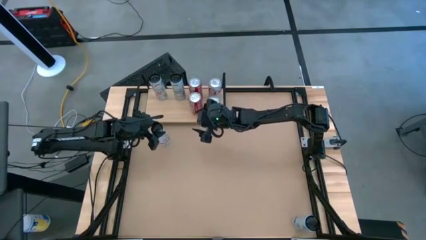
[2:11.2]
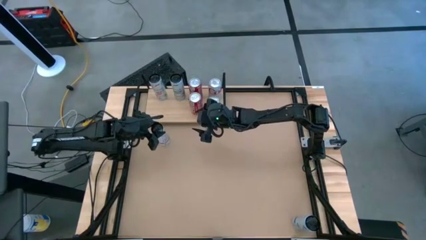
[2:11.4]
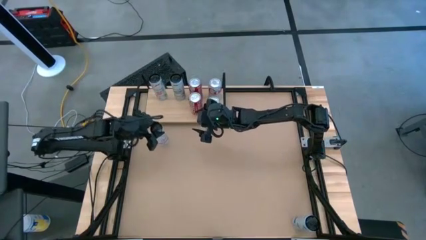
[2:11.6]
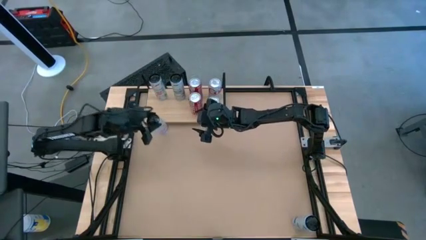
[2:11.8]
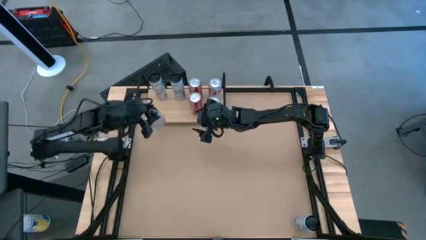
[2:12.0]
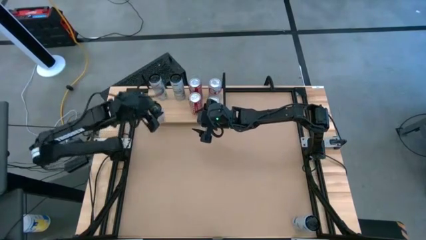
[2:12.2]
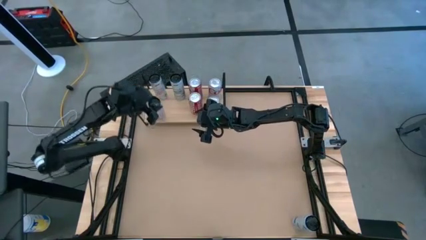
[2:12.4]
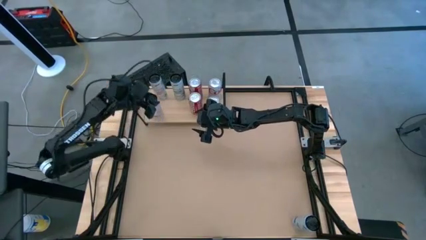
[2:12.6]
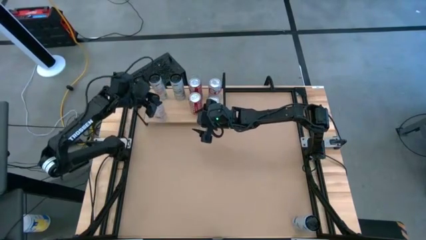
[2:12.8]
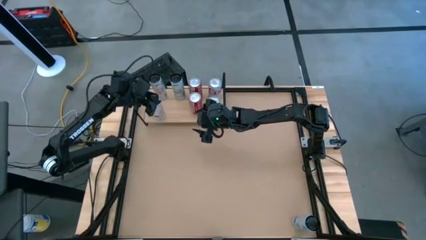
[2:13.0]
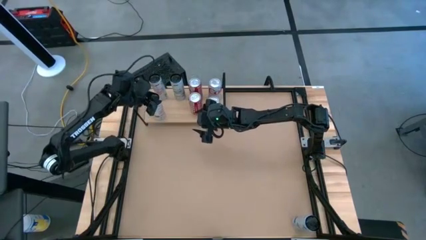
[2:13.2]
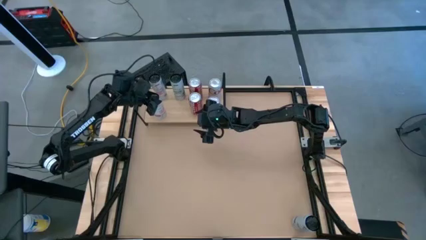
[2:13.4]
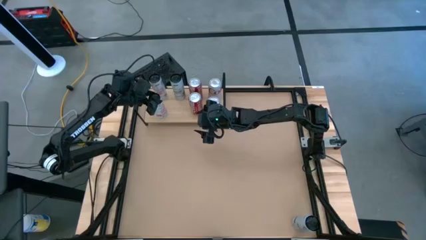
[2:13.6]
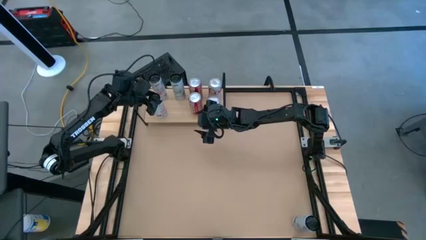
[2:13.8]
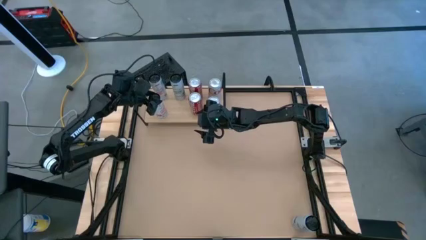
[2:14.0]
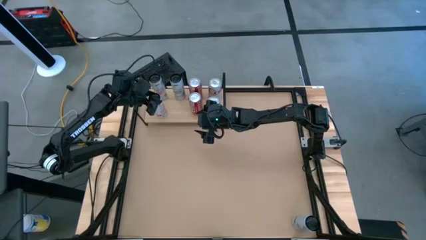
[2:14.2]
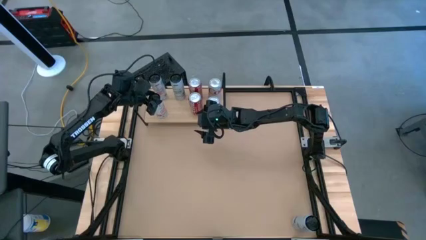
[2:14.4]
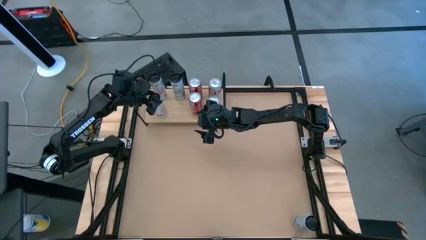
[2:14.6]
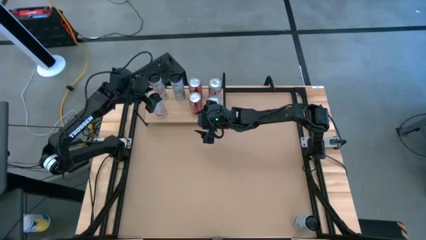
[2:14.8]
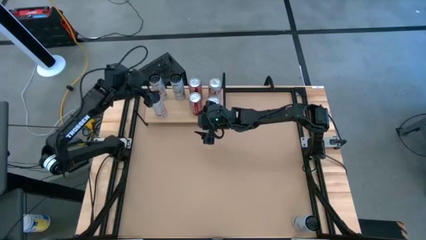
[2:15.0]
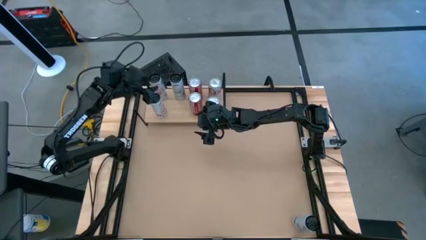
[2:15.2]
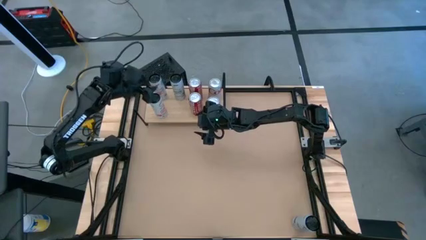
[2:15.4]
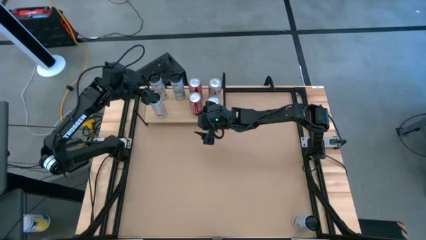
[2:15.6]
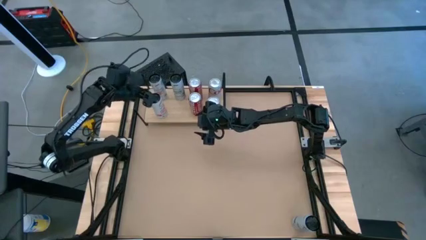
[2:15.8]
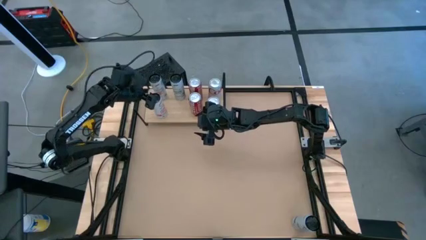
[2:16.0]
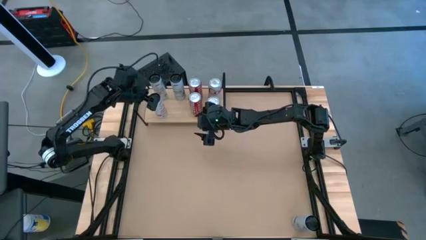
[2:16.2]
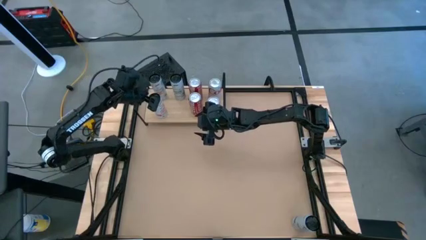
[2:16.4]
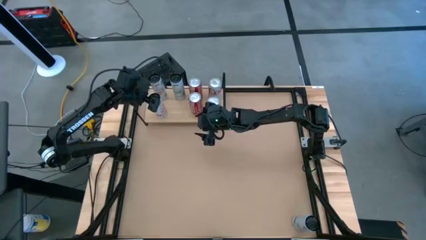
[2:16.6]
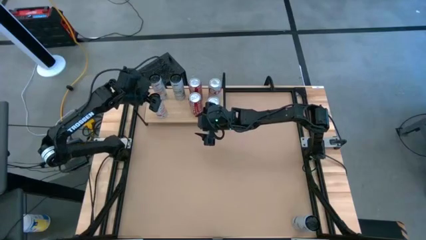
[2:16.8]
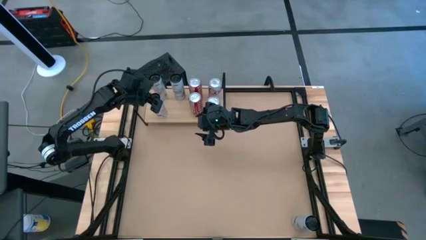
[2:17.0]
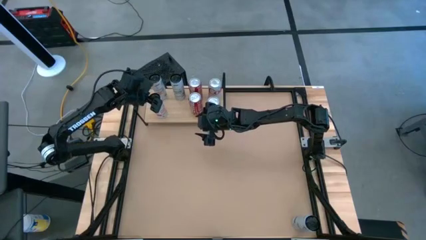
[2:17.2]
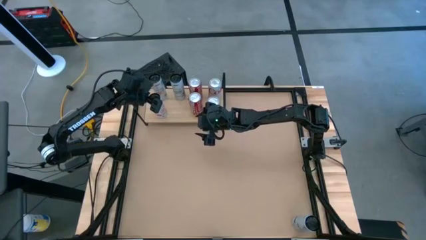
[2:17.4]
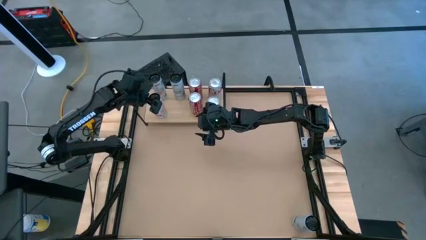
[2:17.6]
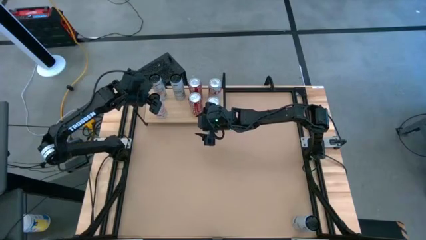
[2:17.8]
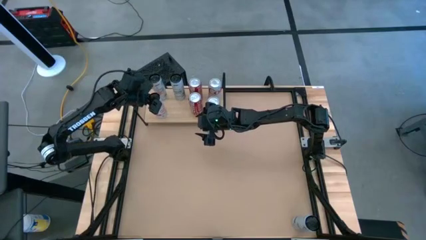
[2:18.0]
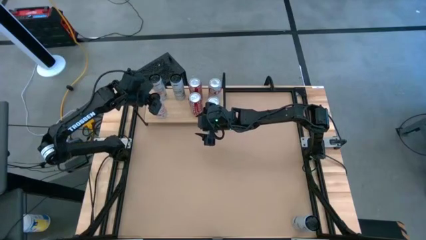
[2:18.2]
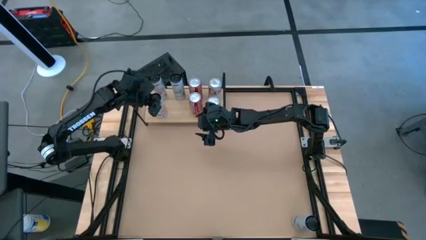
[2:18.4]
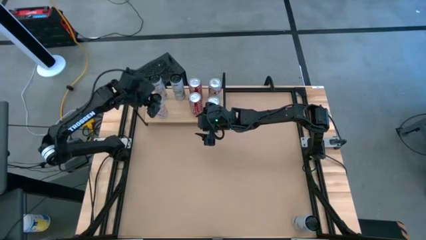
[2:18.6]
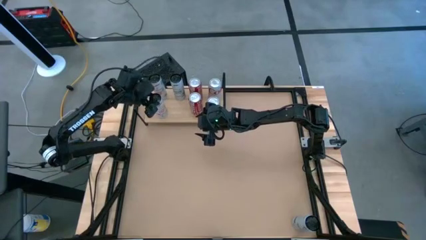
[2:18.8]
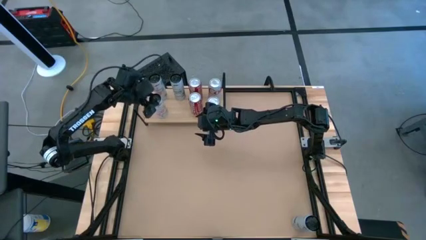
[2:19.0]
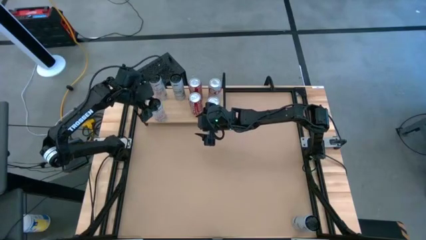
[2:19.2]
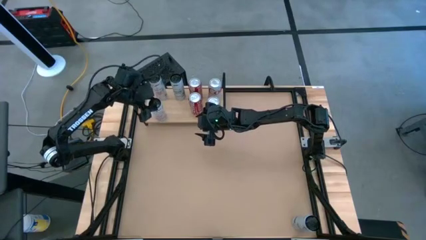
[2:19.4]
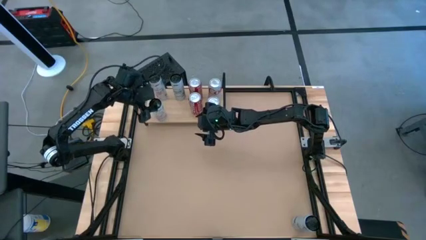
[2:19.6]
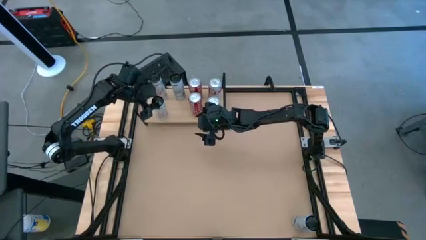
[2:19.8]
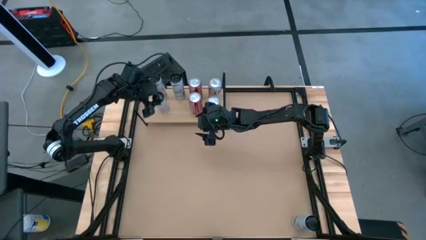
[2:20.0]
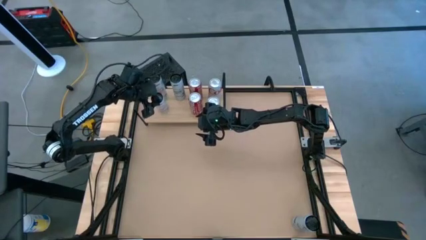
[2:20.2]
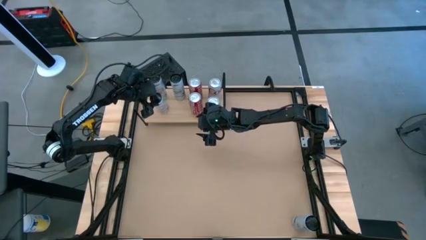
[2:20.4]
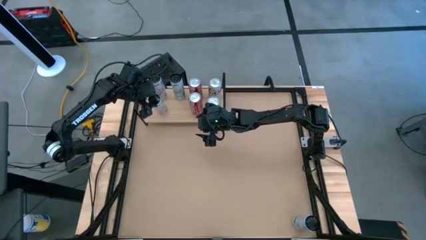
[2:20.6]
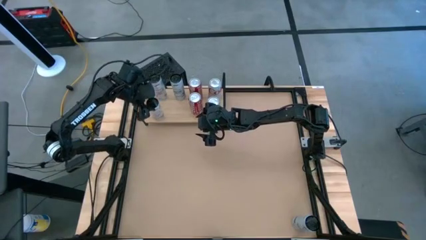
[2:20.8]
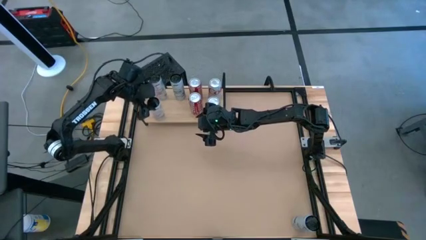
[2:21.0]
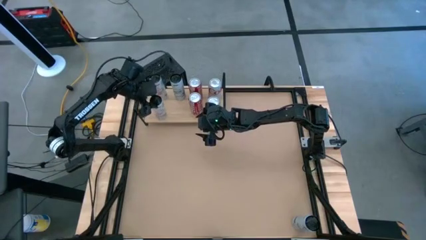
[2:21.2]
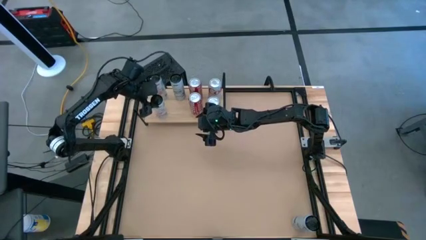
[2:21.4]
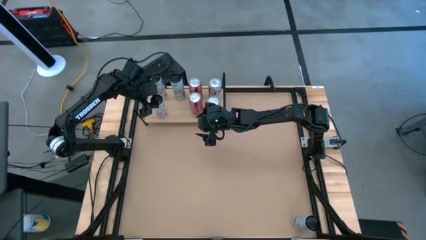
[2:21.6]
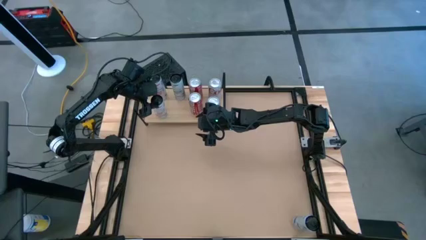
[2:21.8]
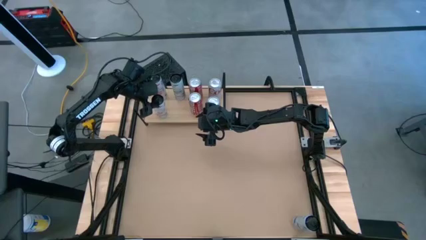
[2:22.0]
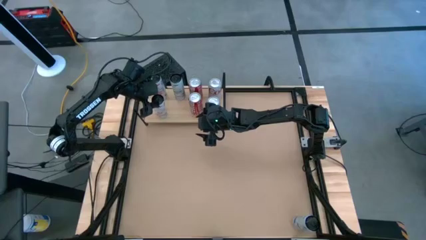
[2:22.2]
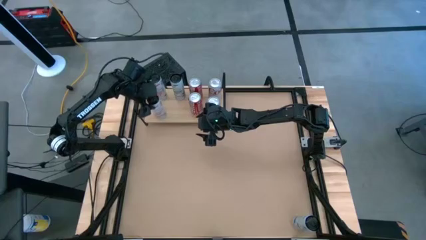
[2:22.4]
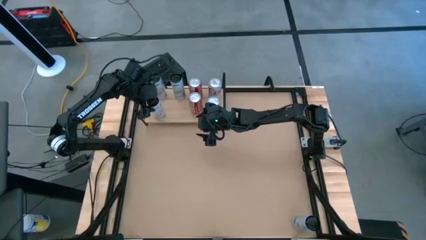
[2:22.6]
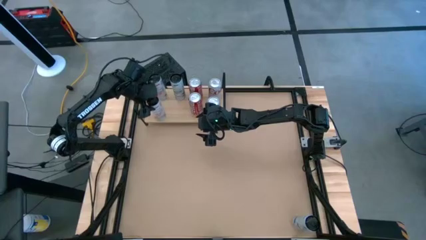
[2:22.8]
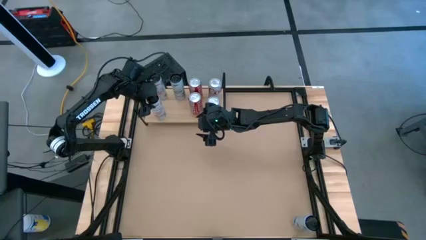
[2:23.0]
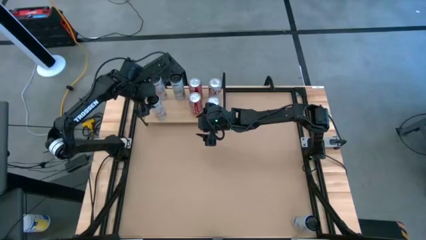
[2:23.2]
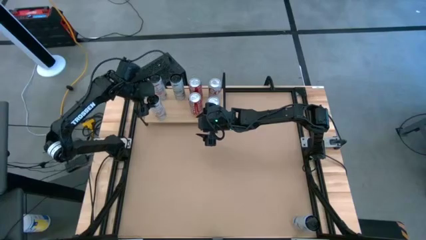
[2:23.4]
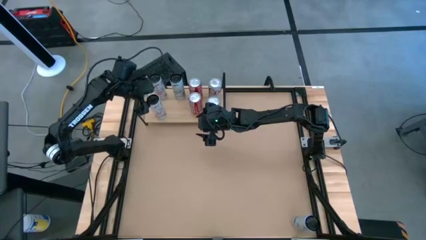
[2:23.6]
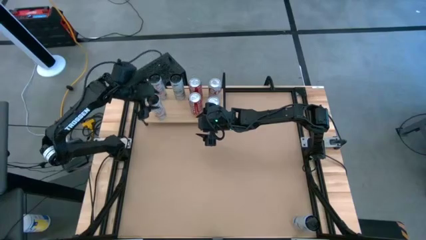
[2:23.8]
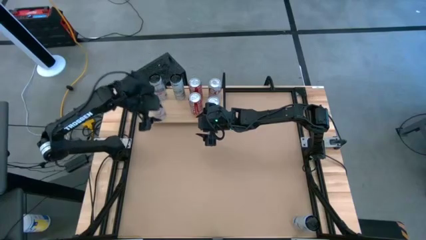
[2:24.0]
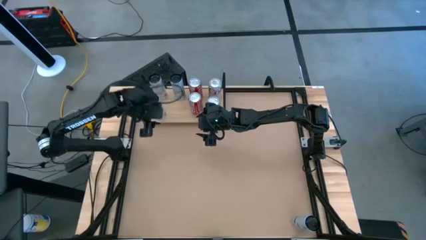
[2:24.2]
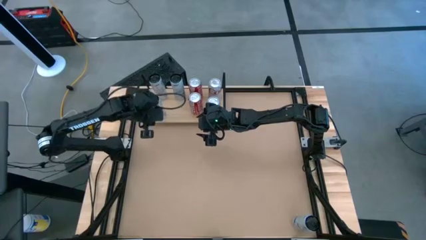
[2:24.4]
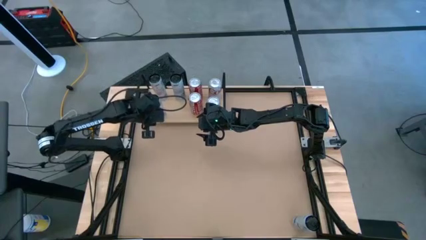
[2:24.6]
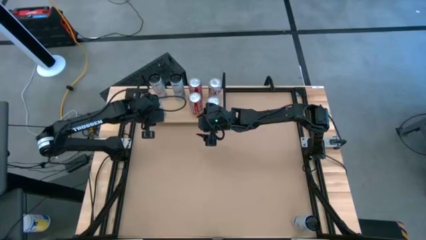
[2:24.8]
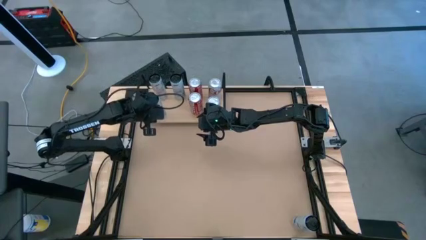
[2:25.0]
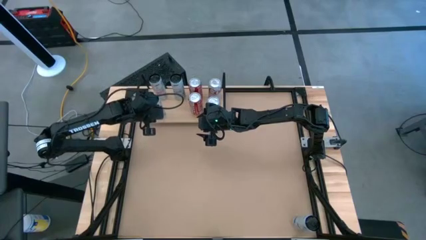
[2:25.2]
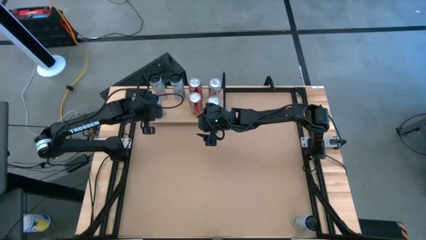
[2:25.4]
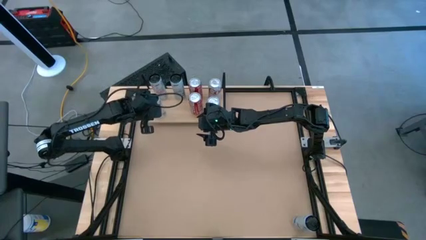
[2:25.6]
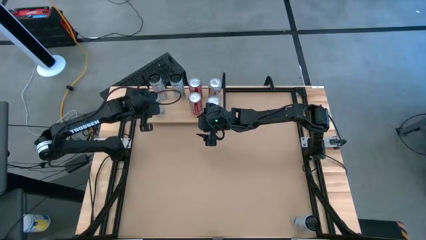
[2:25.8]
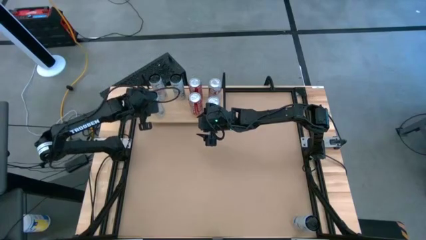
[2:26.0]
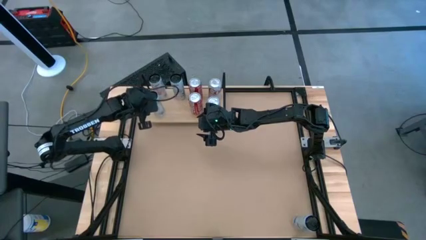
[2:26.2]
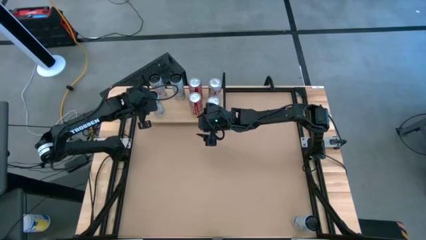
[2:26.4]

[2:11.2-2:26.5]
Task: Place canned beverage on shelf
Put the white and pink soda can on the shelf aligned with the other white and pink soda can
